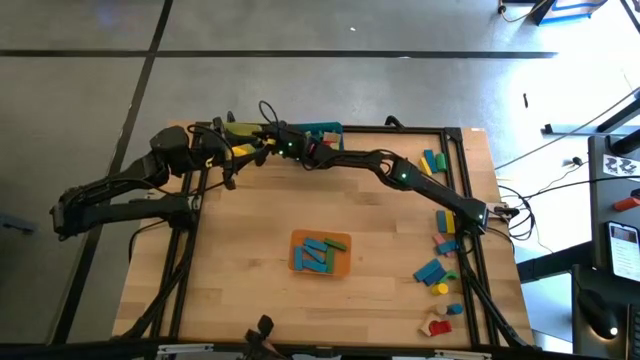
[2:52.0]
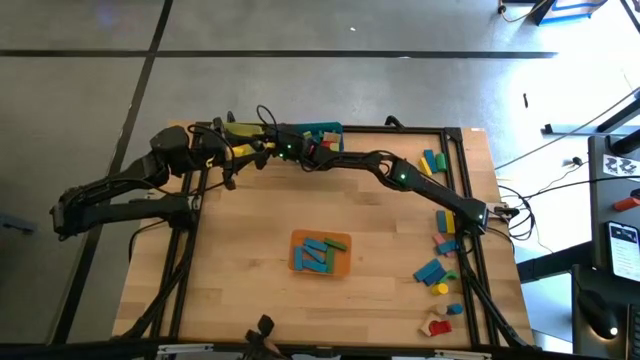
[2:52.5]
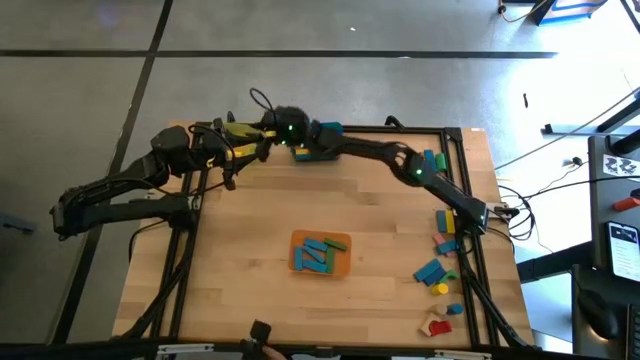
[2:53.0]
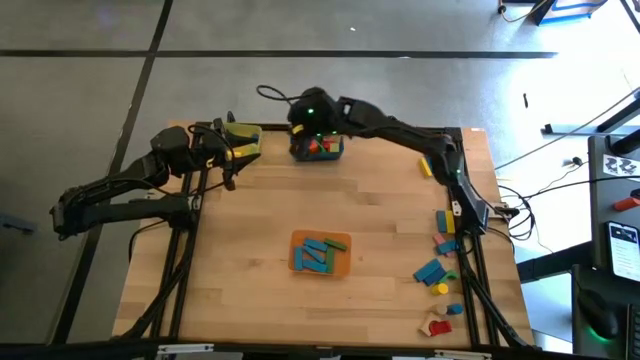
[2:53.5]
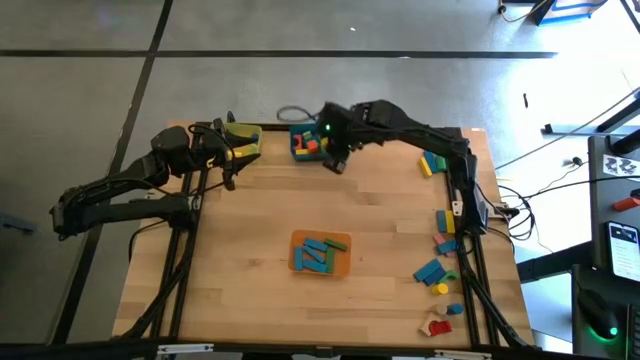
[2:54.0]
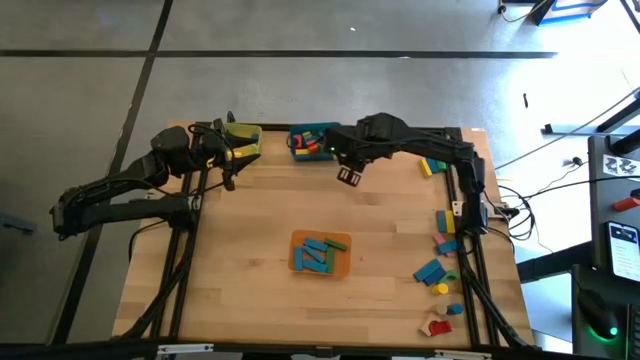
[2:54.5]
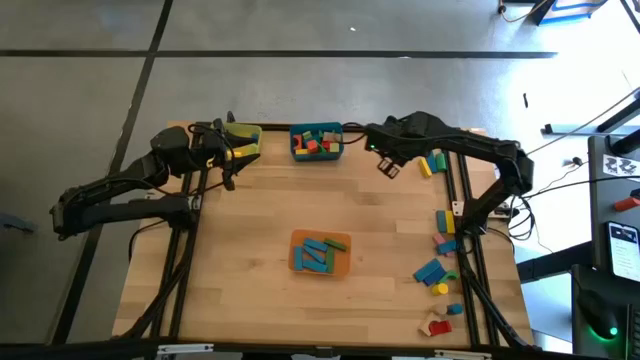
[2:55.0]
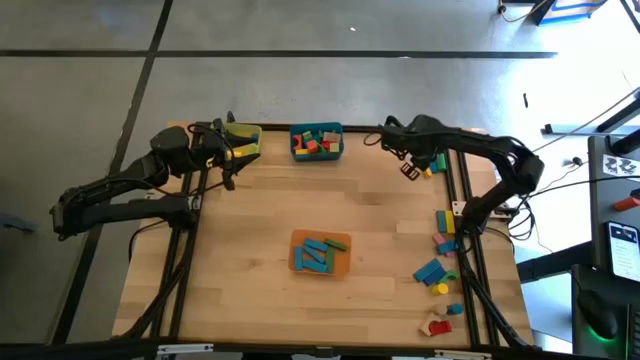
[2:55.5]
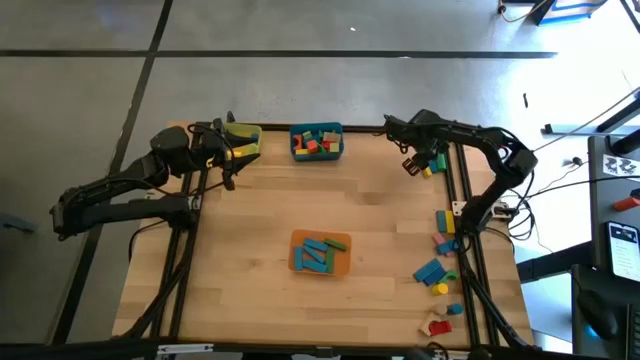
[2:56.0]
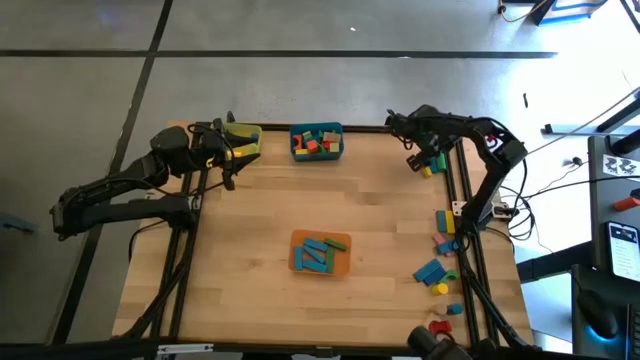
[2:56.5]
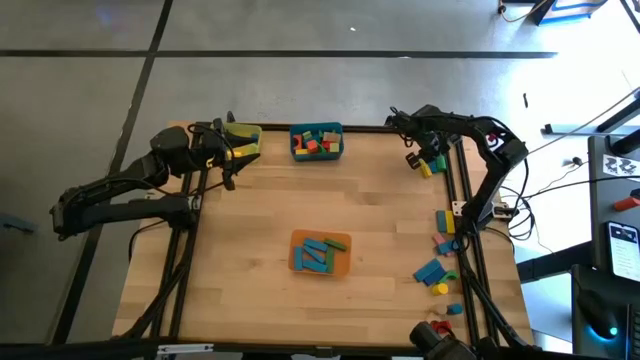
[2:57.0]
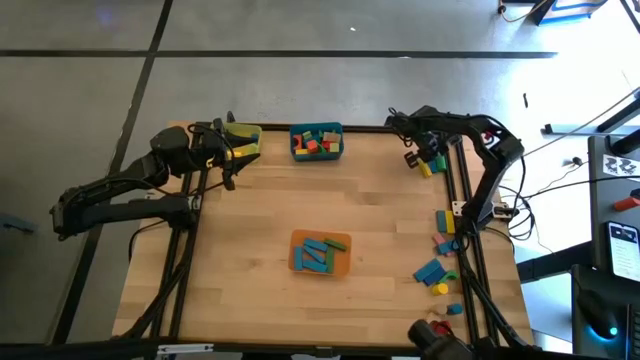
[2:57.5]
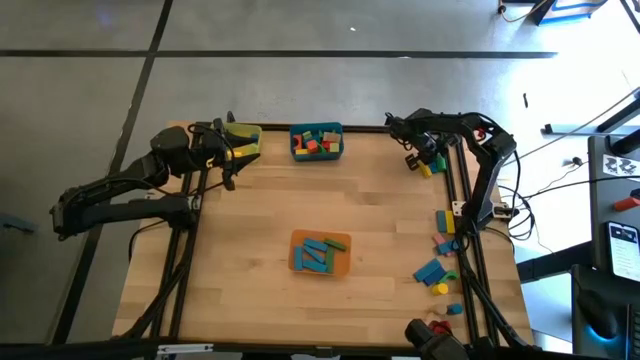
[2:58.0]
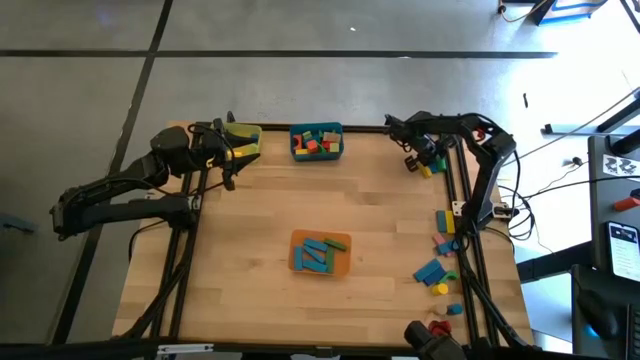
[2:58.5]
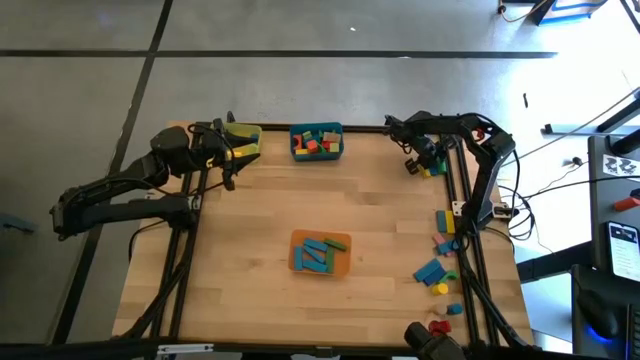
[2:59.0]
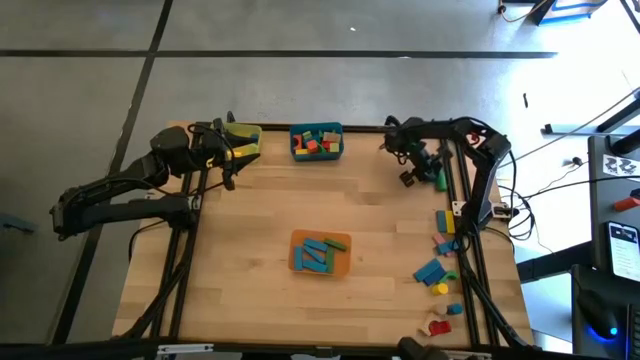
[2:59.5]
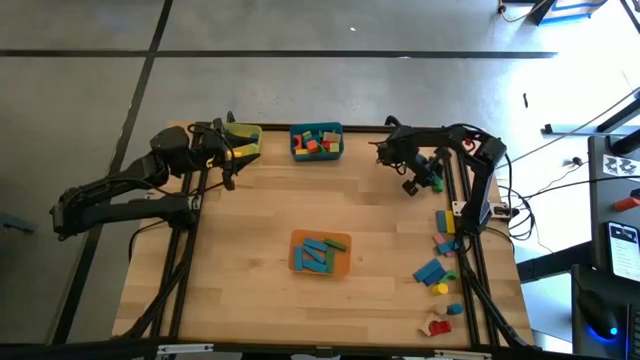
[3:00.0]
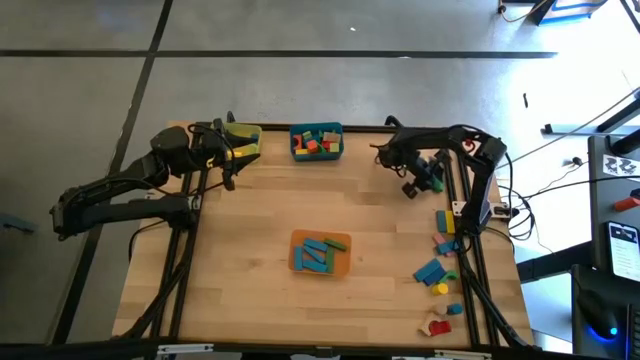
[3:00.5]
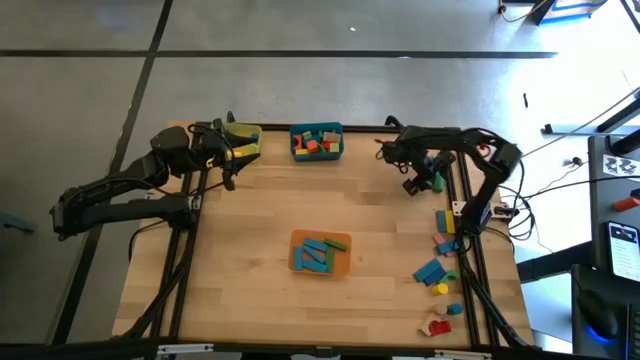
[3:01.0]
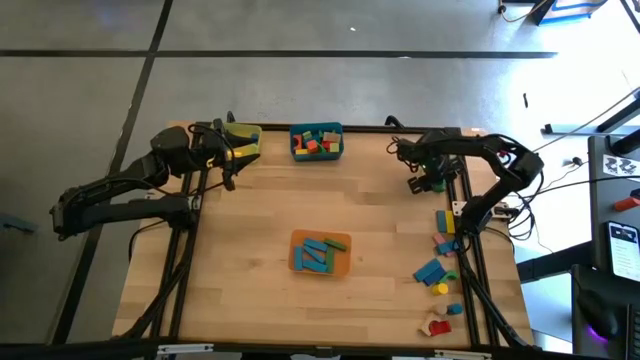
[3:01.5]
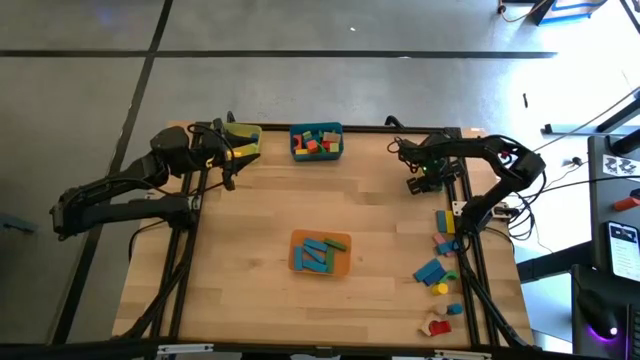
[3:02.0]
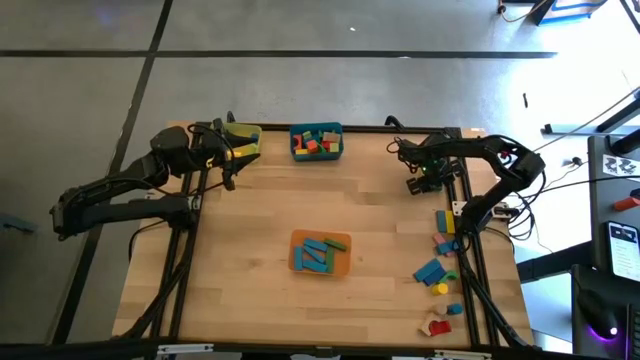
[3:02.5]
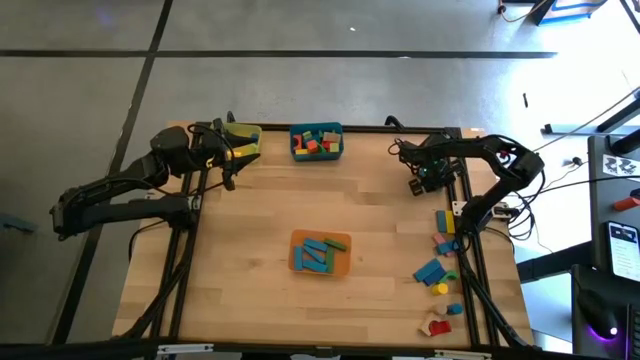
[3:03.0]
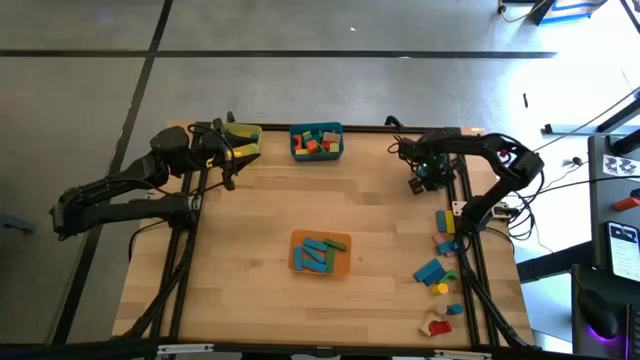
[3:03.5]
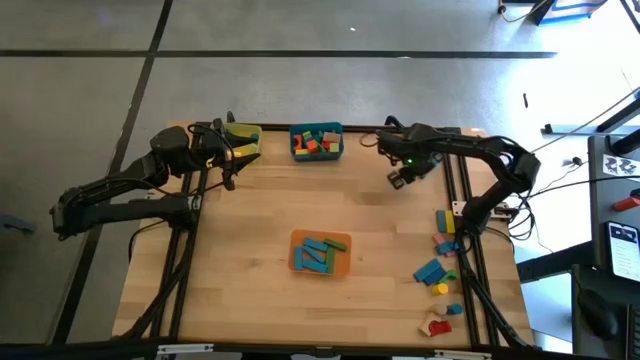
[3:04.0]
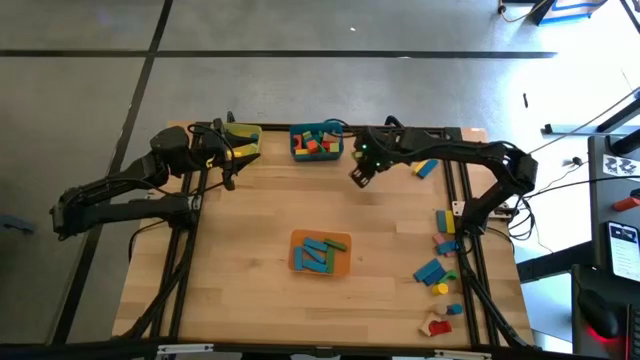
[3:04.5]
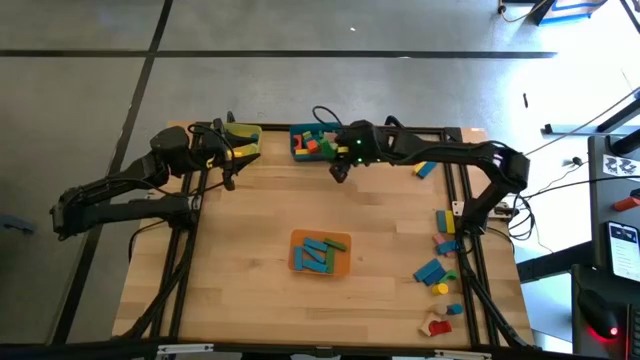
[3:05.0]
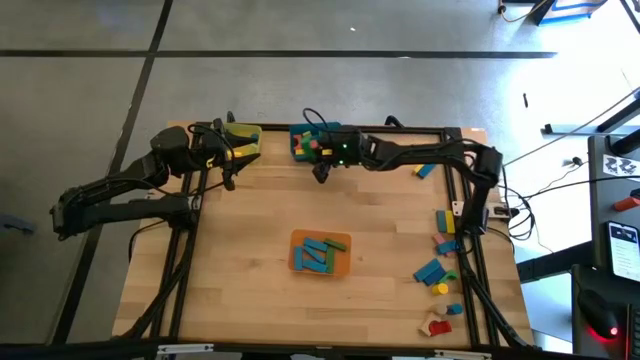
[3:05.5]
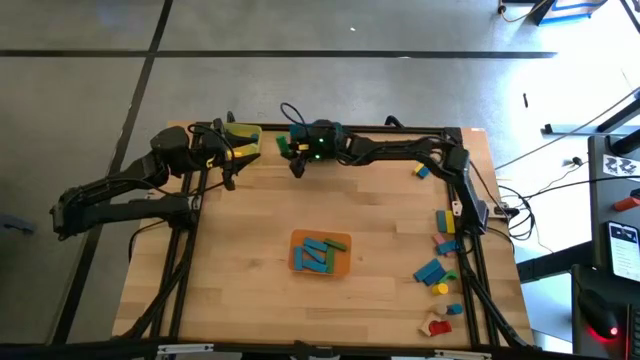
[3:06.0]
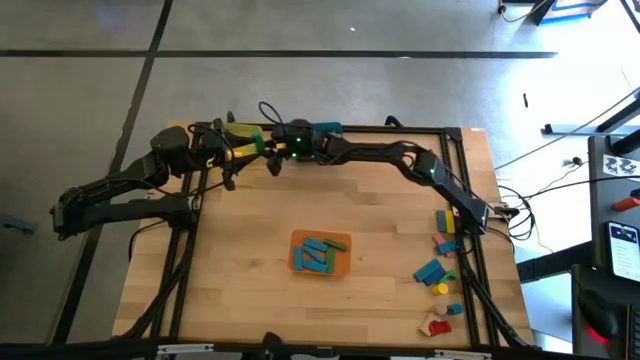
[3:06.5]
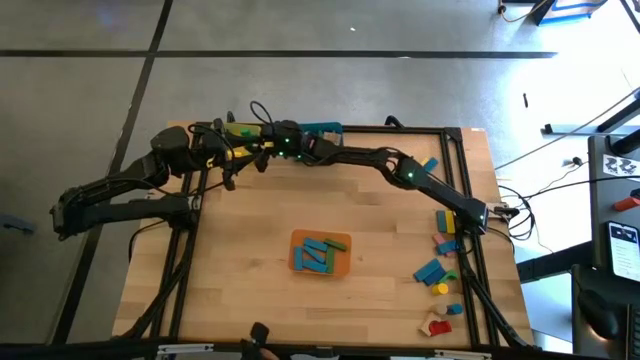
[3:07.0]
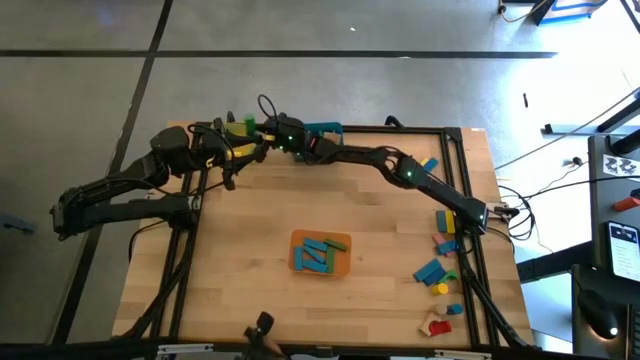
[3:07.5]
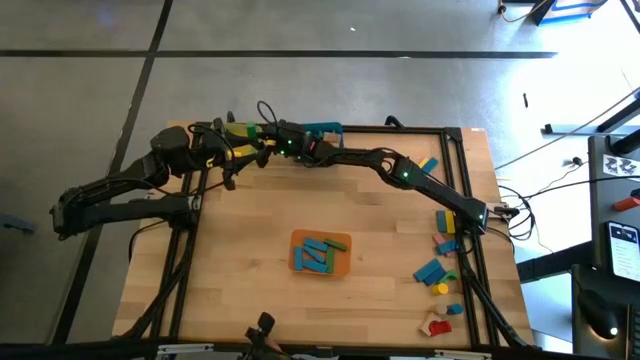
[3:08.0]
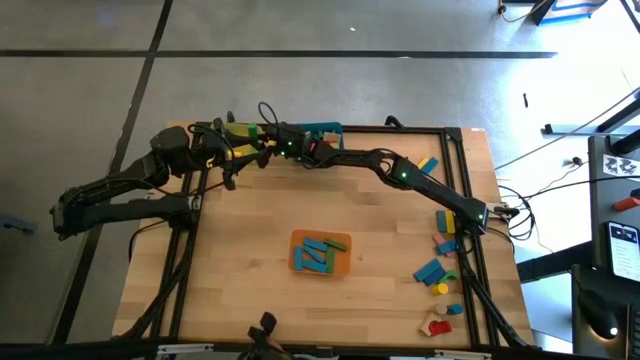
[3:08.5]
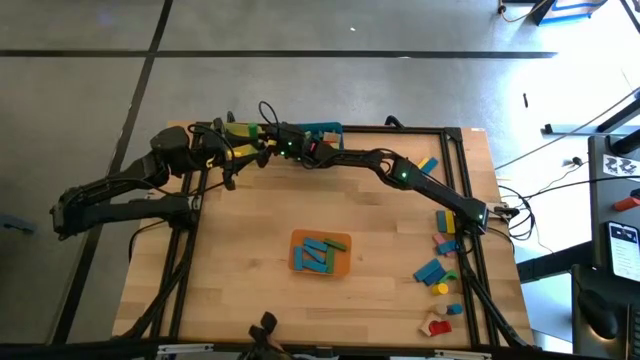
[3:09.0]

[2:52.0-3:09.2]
Task: Sort blocks by size
Put the green cylindrical block into the yellow bin

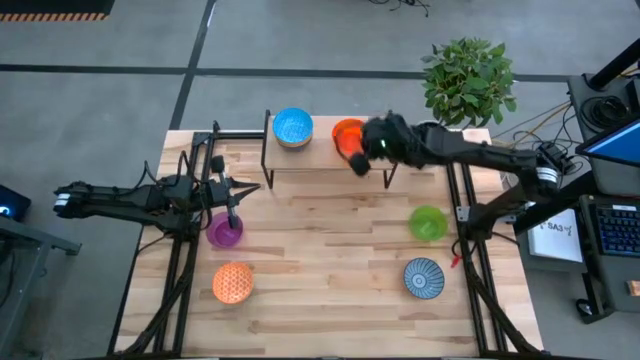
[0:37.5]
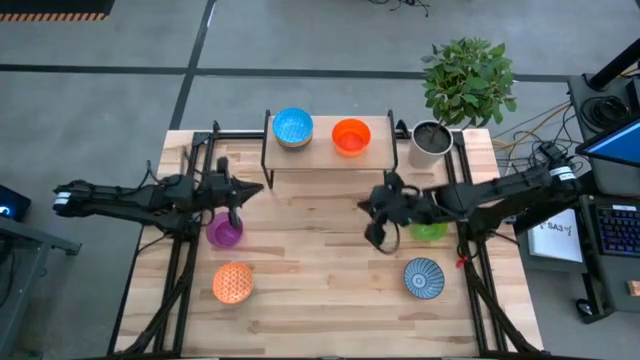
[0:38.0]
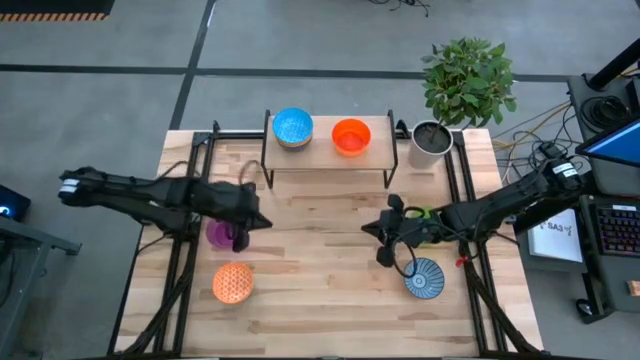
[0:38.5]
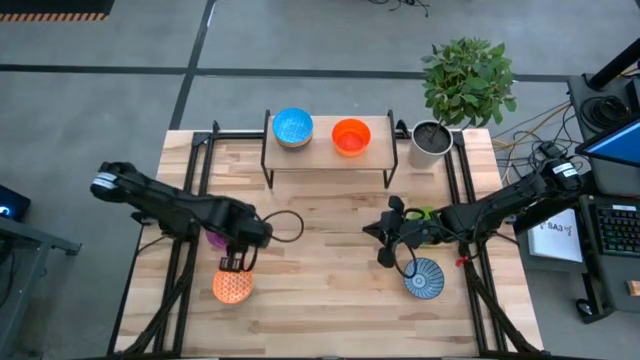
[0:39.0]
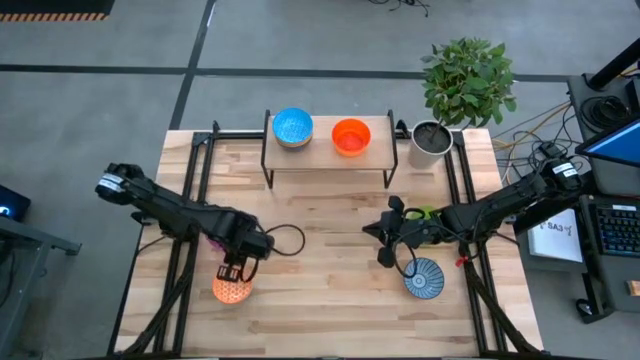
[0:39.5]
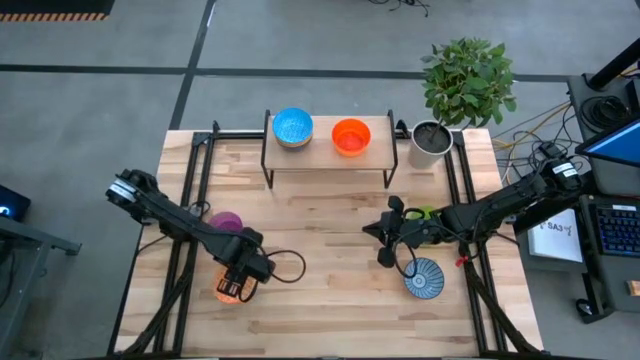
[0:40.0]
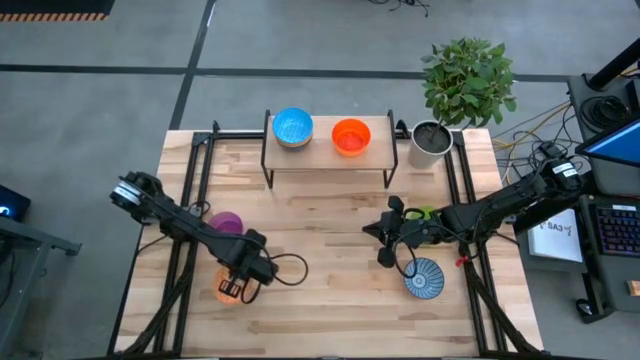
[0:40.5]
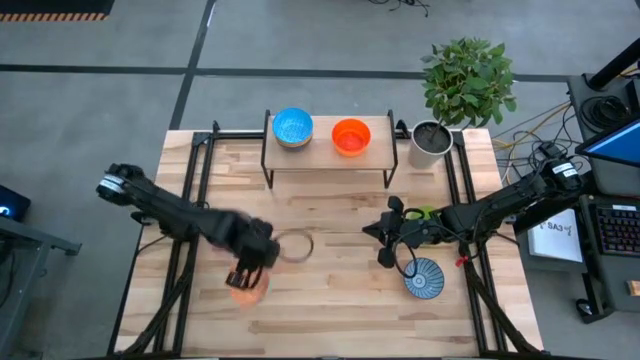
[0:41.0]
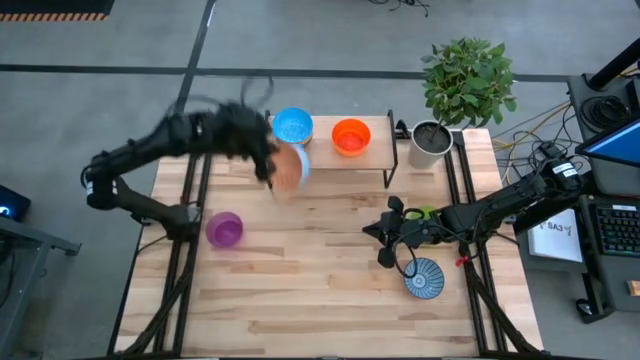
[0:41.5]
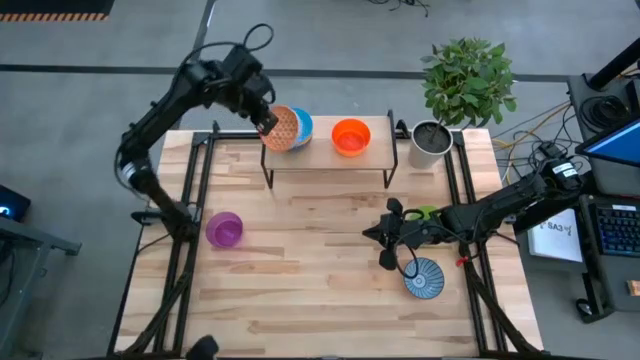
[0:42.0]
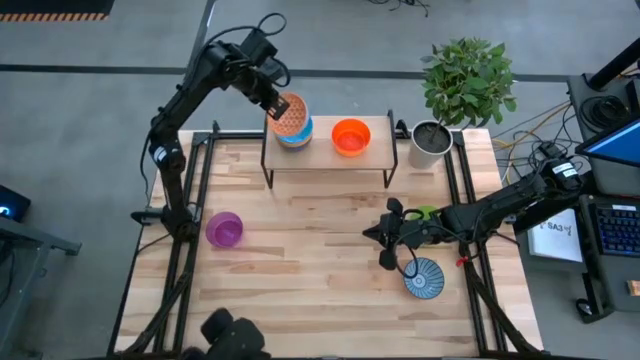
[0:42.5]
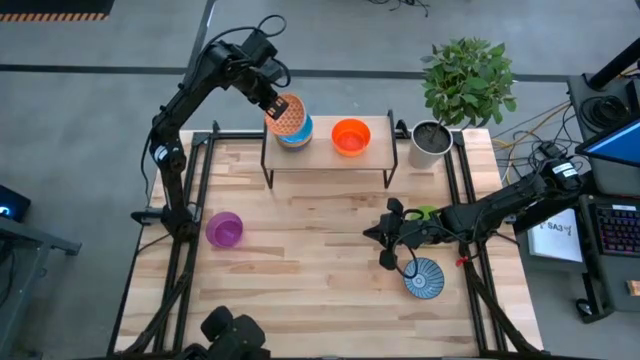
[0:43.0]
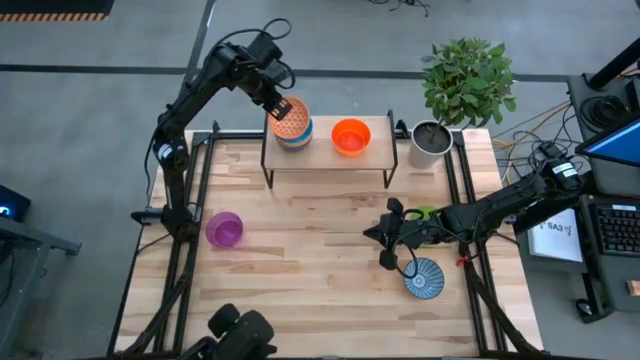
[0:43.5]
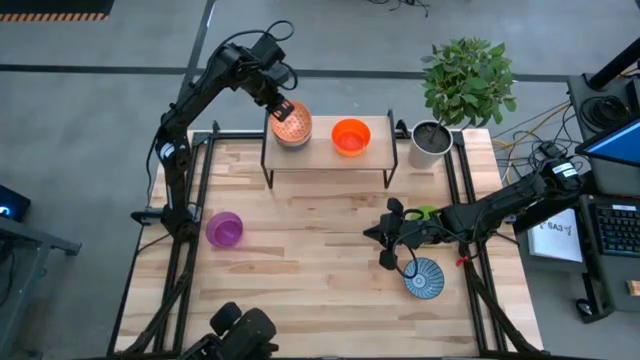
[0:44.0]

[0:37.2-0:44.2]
Task: Place and stack bowls onto a shelf
Stack the patterned orange bowl on top of the patterned light blue bowl on the shelf
